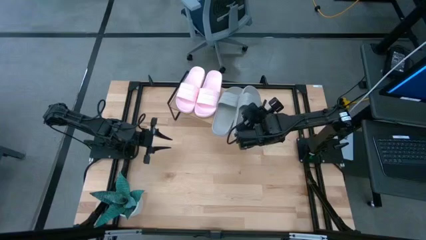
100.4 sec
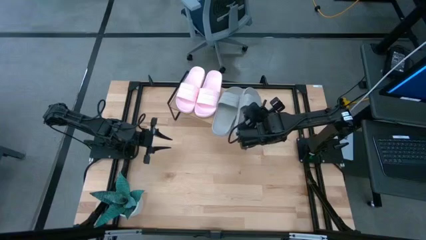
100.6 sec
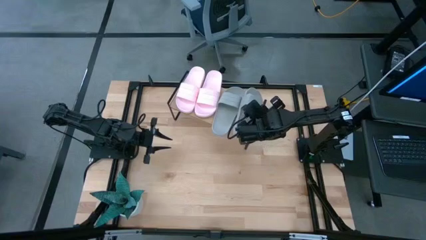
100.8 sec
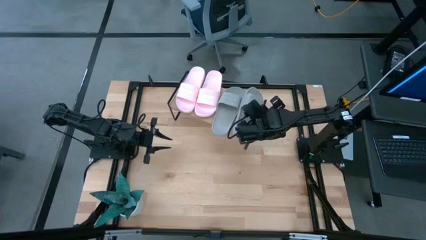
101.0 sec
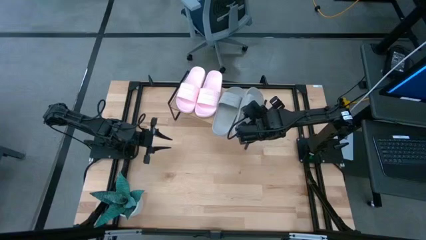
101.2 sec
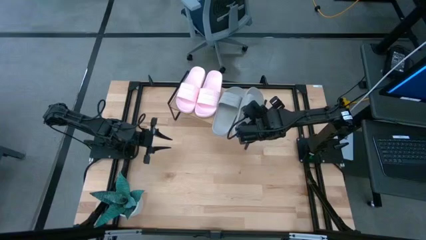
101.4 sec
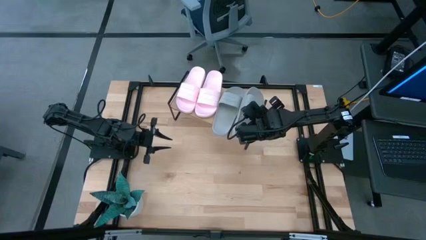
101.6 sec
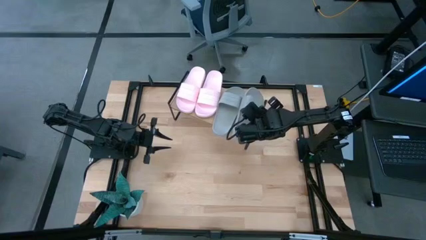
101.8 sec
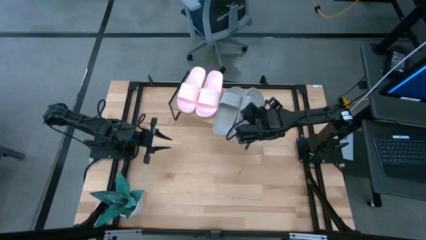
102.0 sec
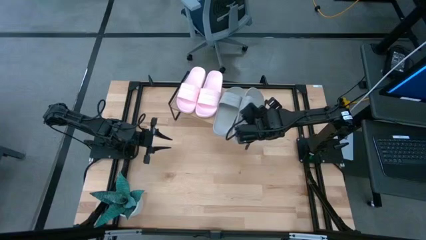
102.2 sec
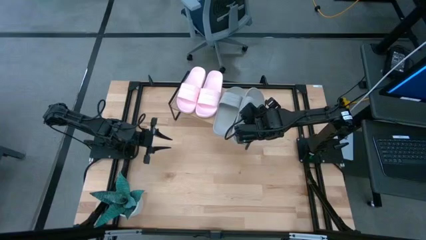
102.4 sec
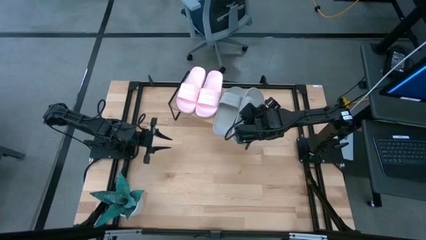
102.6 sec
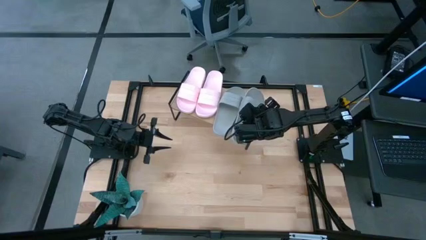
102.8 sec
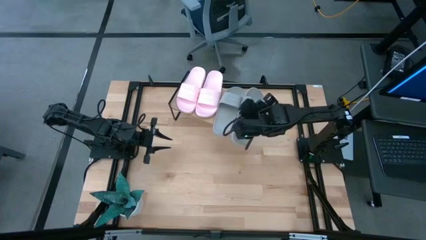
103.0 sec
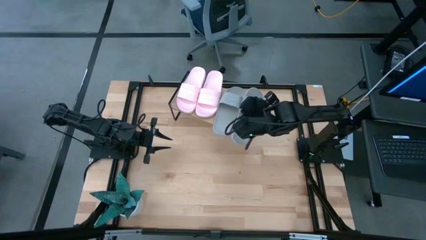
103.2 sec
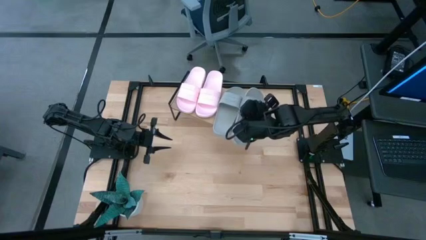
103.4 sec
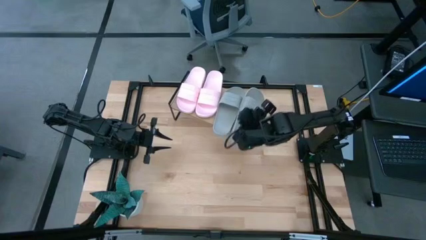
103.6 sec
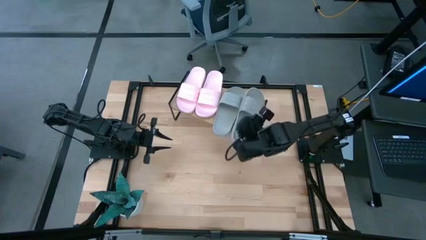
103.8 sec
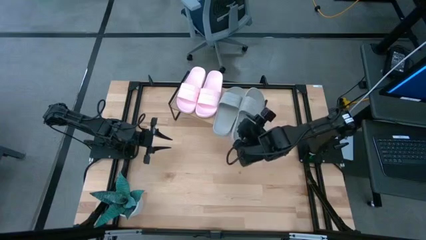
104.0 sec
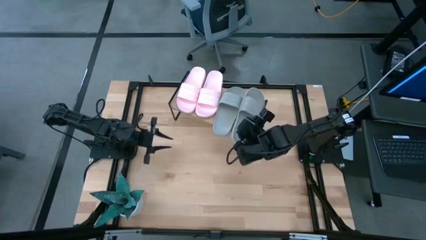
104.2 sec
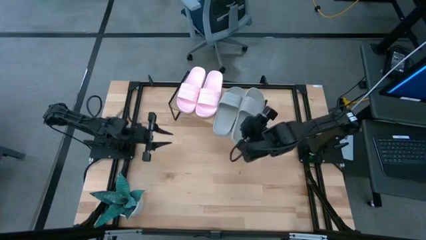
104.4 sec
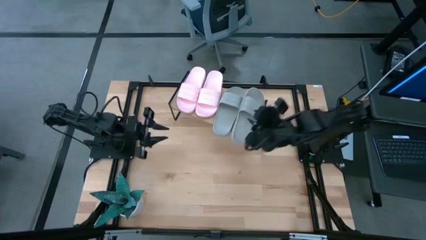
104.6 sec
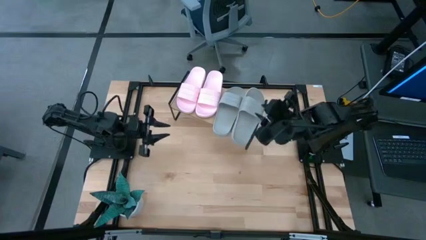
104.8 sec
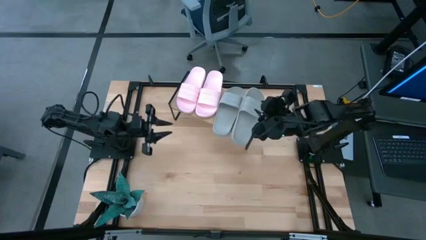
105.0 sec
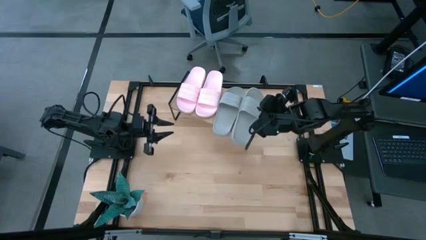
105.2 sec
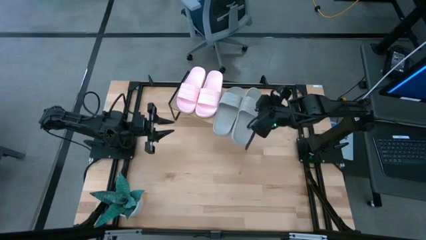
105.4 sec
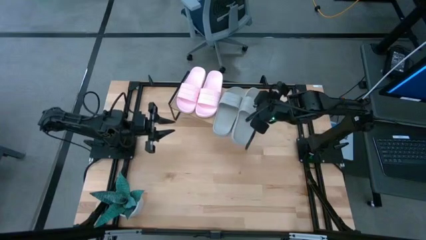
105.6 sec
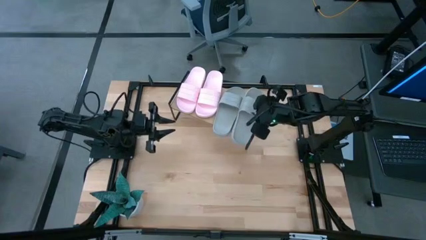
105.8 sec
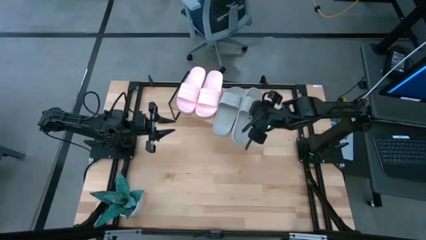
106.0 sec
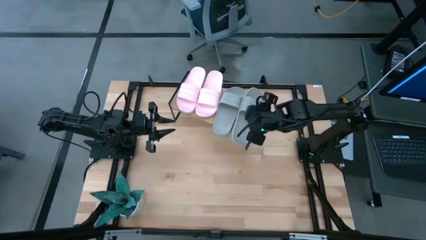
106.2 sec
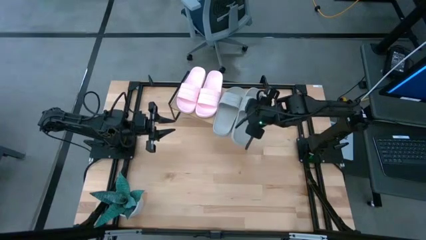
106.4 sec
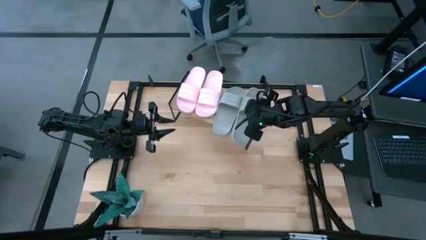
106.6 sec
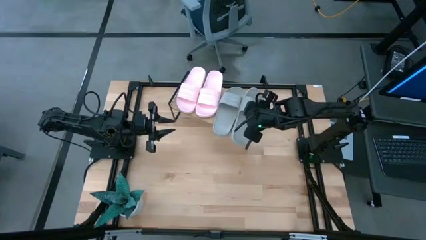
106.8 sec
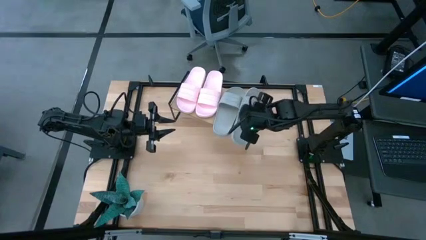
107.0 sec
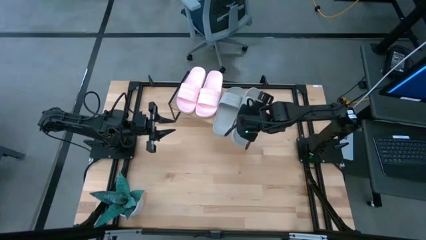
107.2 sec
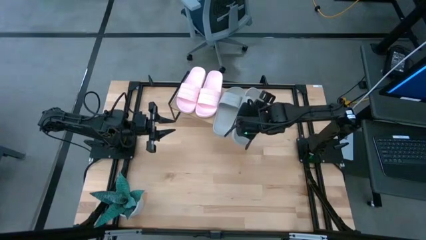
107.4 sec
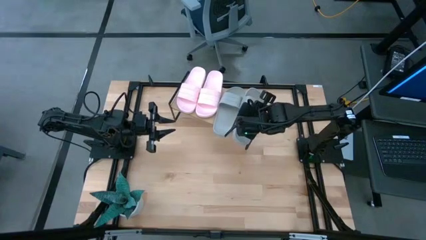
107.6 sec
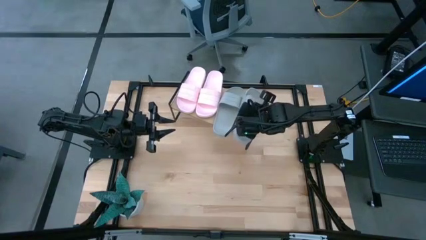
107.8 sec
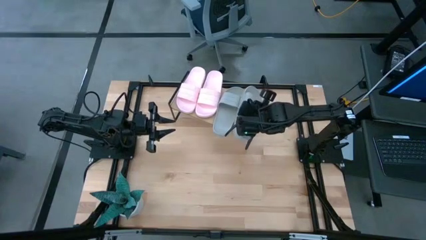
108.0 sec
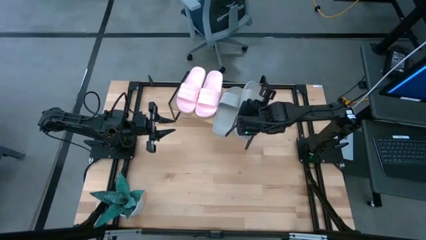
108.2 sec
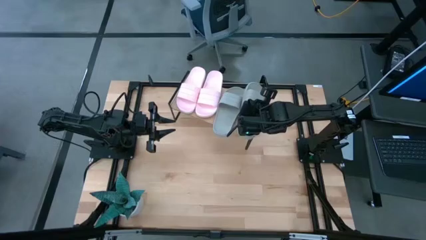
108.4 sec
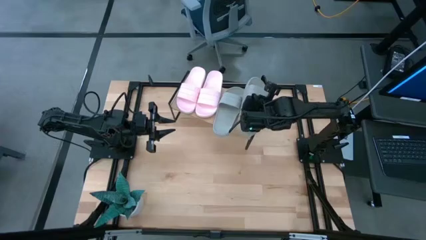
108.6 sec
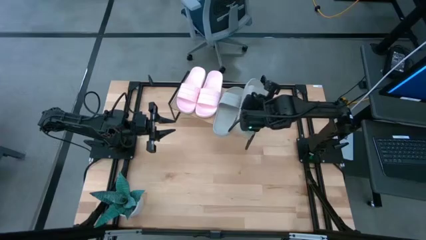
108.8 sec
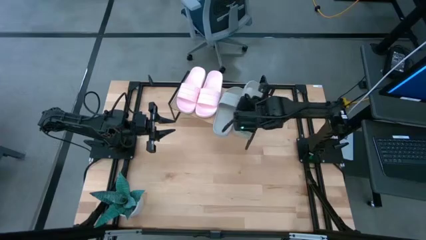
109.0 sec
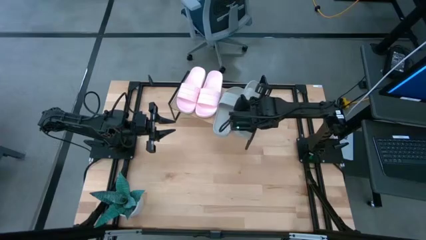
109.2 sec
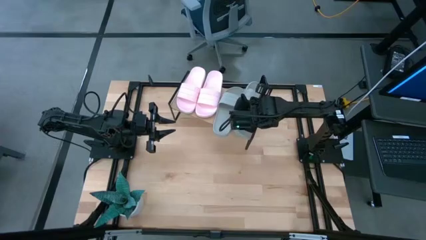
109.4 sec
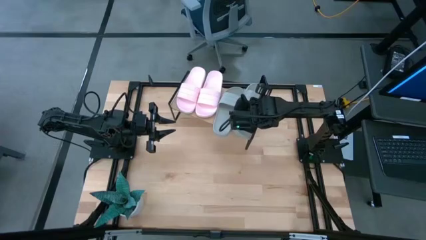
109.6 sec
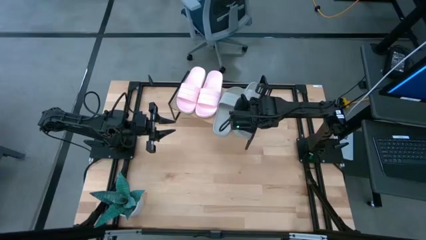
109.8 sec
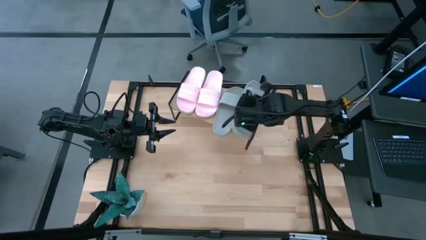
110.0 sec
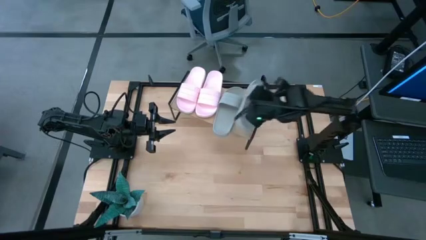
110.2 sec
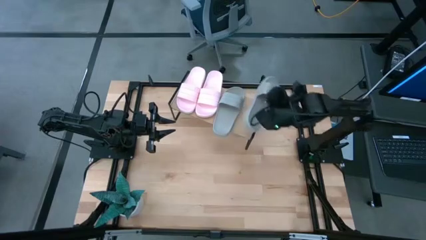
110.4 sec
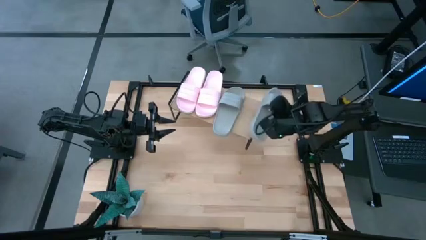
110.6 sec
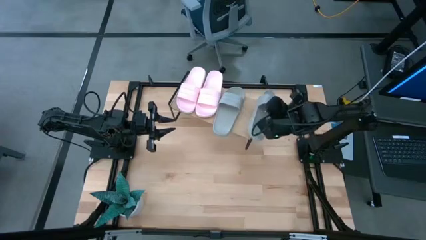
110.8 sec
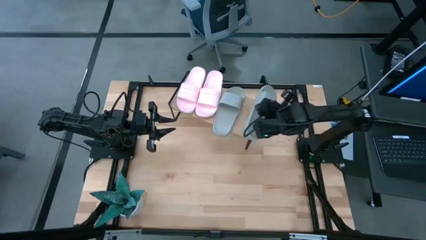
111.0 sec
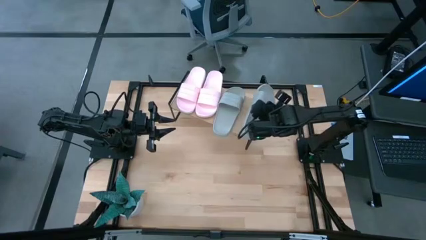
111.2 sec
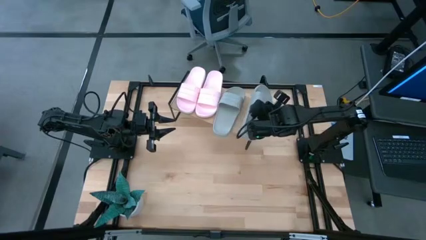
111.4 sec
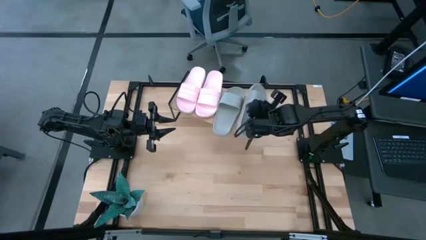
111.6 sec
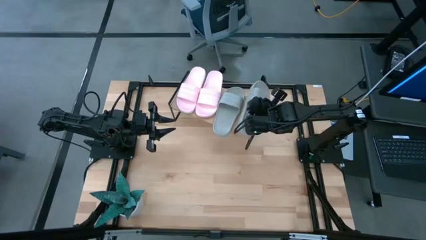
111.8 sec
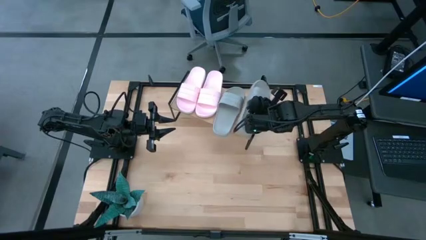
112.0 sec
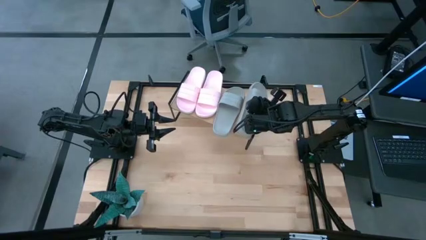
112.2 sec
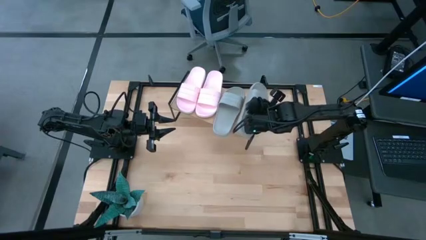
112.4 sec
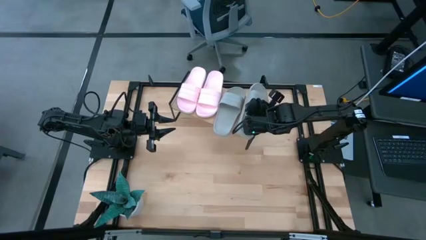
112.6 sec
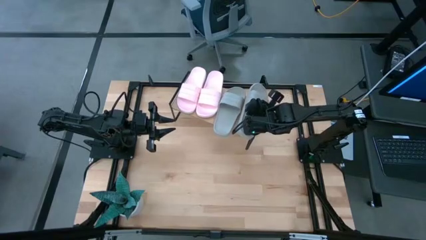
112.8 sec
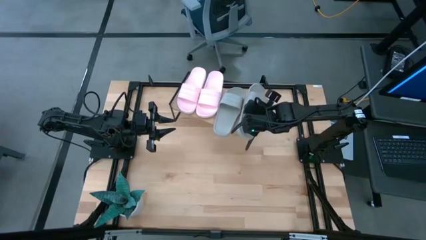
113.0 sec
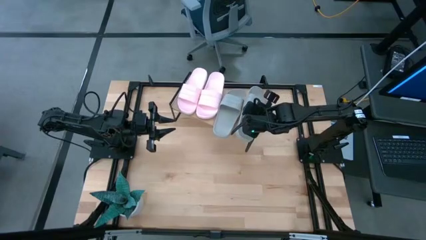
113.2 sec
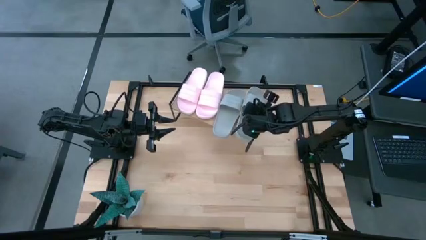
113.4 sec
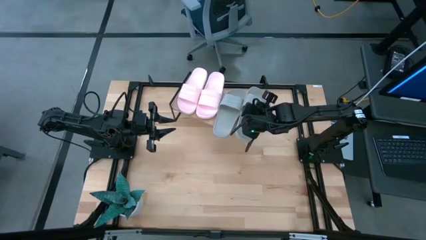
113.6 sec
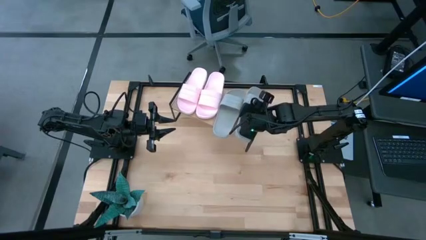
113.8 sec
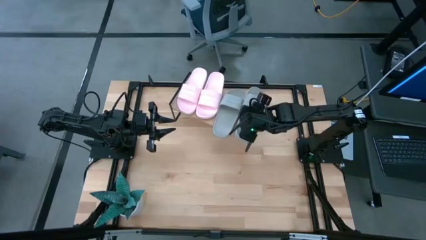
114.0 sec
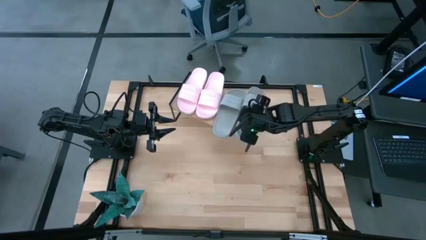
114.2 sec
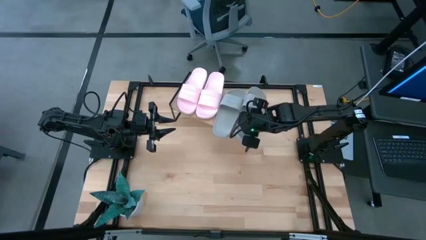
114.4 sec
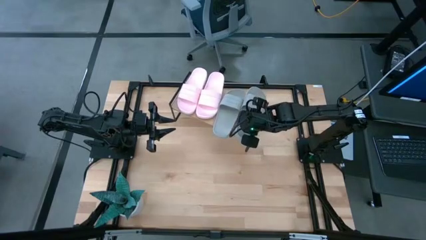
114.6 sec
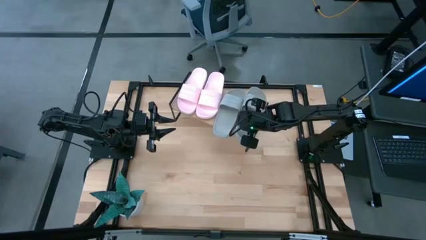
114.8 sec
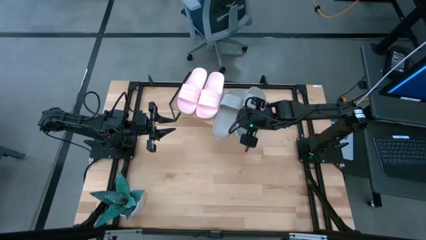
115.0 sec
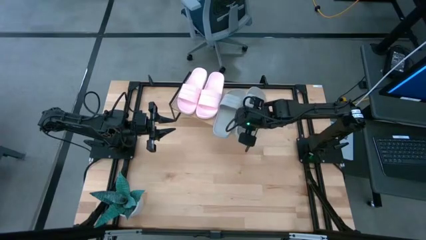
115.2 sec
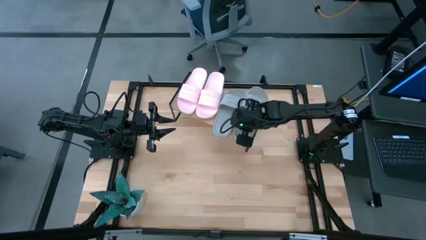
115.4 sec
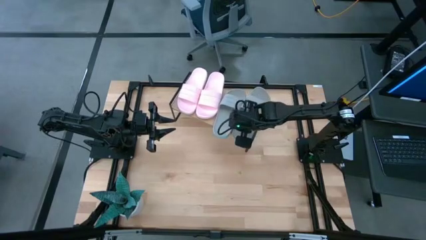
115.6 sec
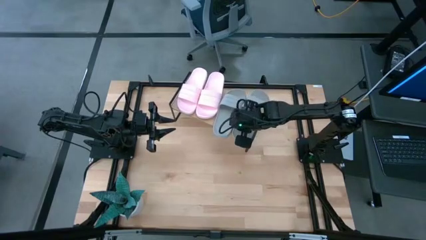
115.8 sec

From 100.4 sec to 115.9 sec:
Task: Pick and place slides into the shelf
Put the gray slide on the shelf

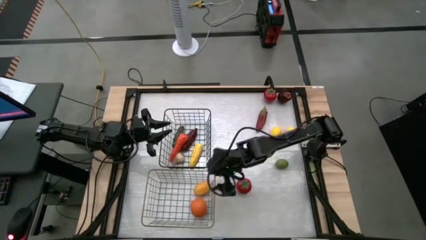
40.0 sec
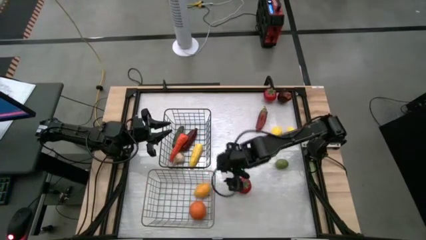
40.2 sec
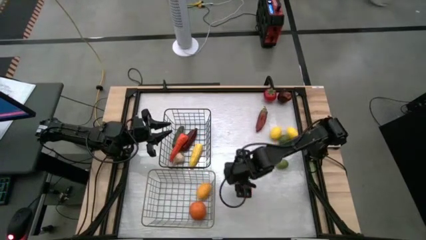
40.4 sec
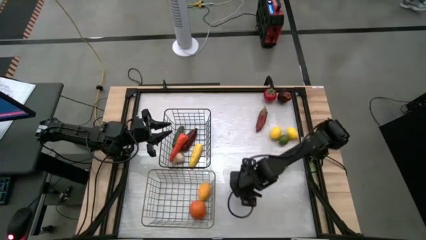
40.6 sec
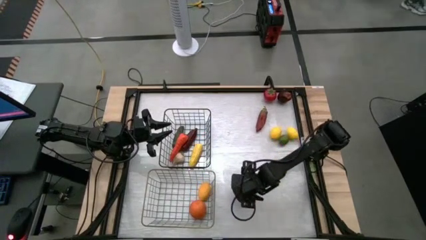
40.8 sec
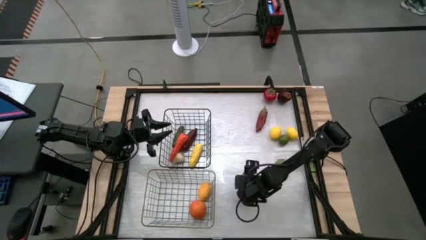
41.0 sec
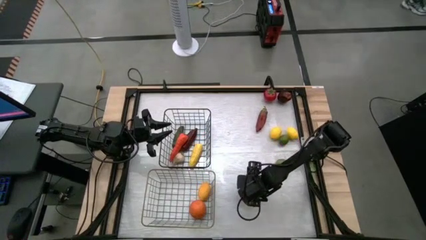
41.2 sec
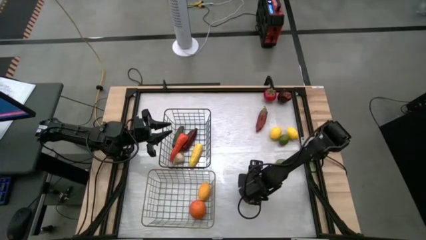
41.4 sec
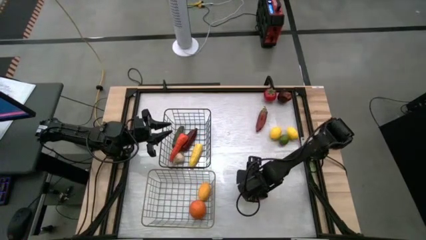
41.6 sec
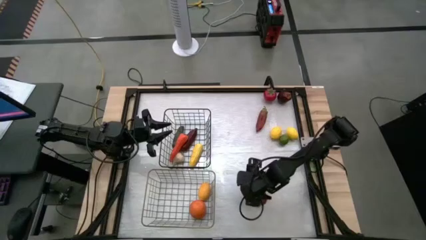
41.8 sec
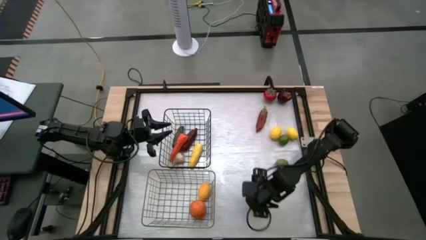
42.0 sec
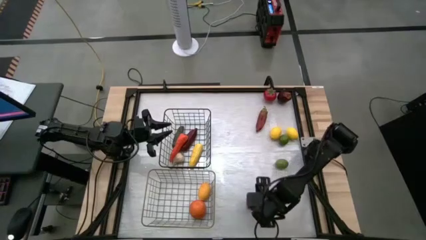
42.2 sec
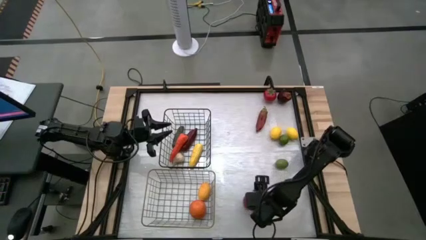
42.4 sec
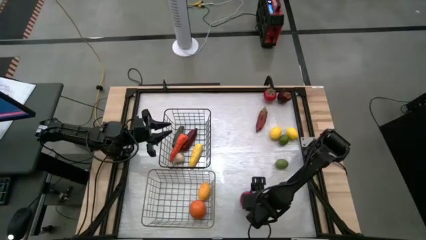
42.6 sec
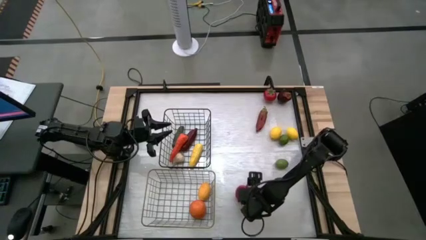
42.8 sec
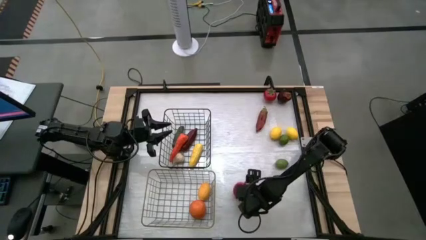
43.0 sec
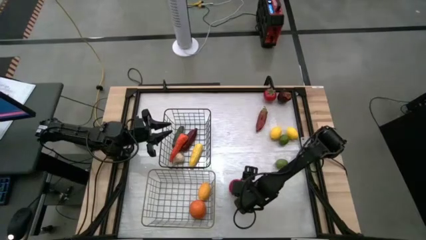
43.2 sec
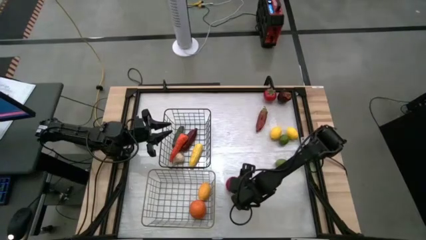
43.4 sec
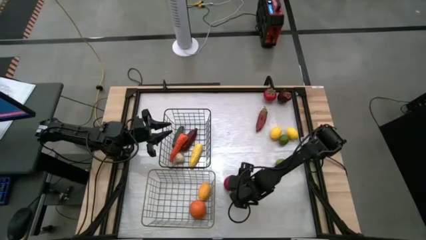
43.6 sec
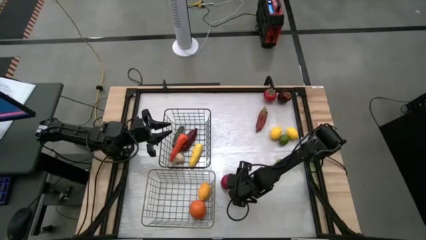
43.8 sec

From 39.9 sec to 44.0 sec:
Task: Sort produce into baskets
Put the bottom tomato into the wire basket
